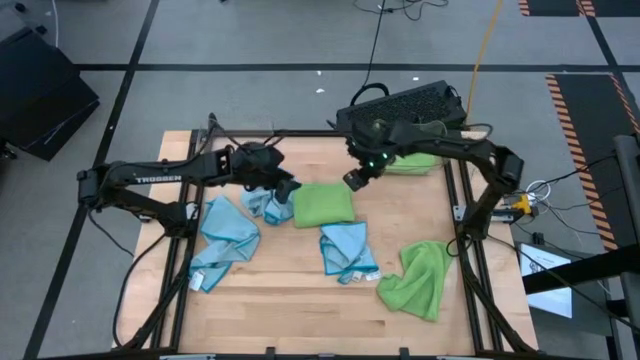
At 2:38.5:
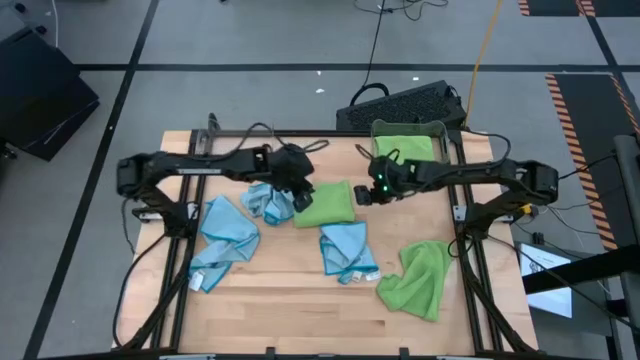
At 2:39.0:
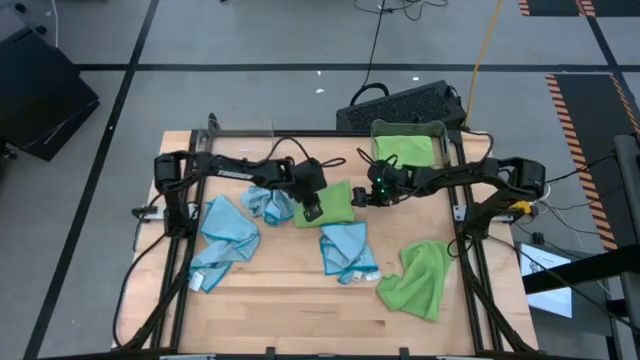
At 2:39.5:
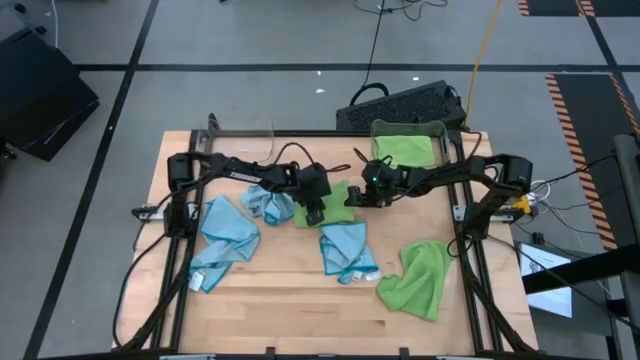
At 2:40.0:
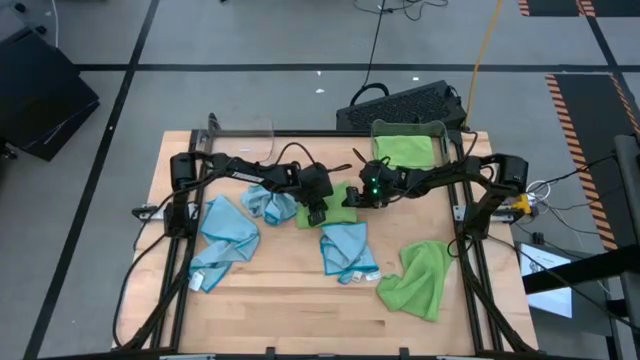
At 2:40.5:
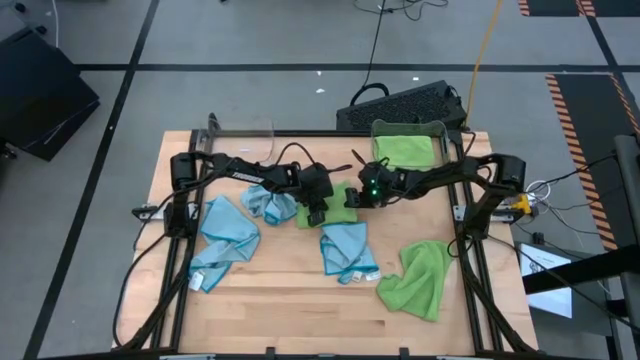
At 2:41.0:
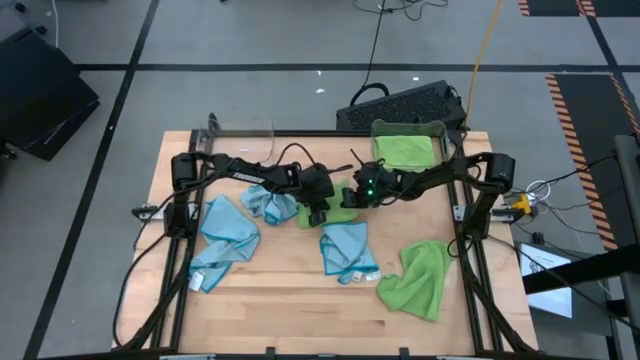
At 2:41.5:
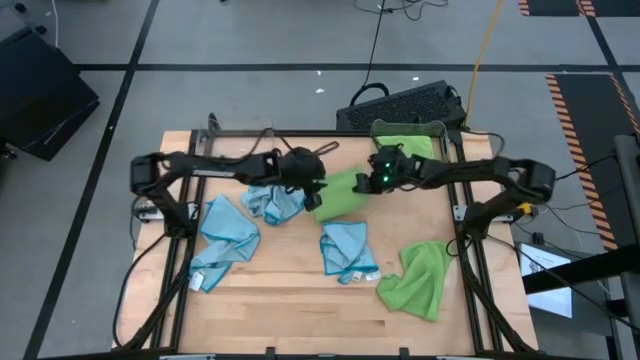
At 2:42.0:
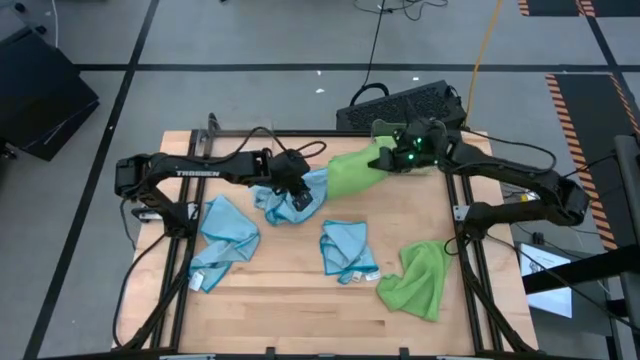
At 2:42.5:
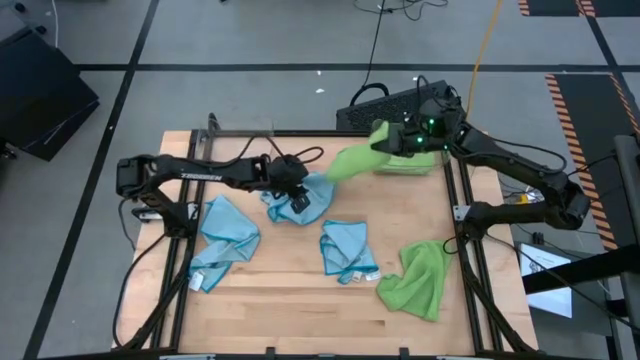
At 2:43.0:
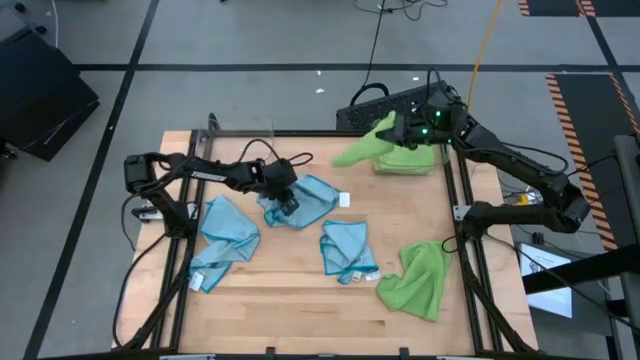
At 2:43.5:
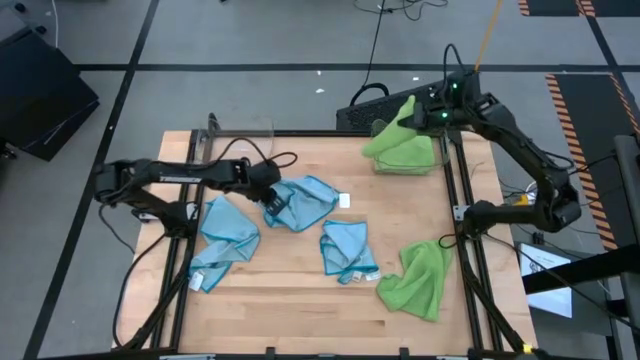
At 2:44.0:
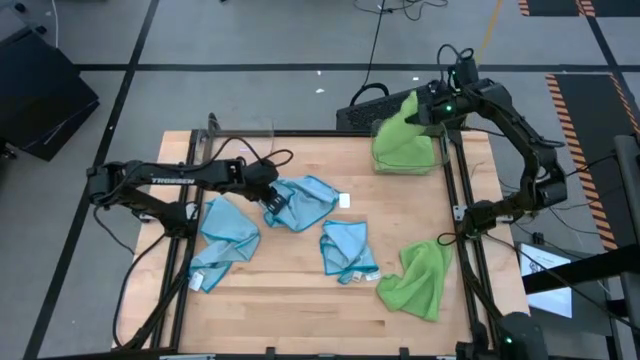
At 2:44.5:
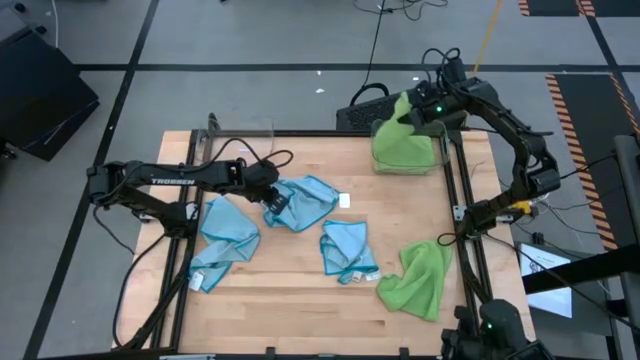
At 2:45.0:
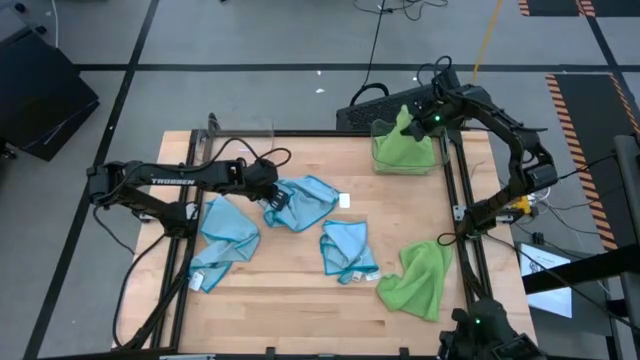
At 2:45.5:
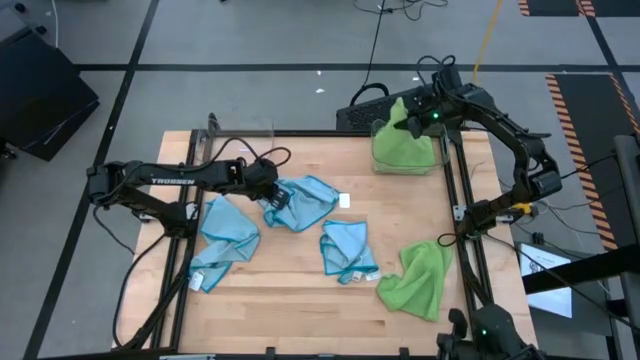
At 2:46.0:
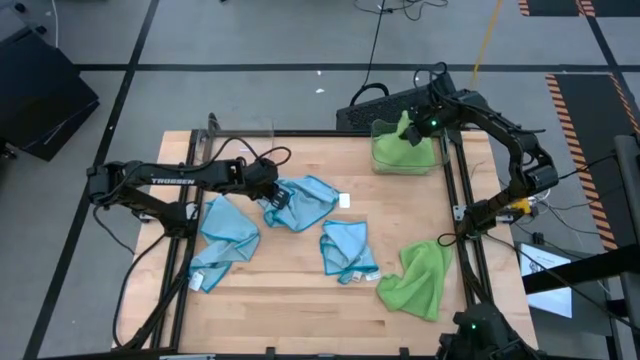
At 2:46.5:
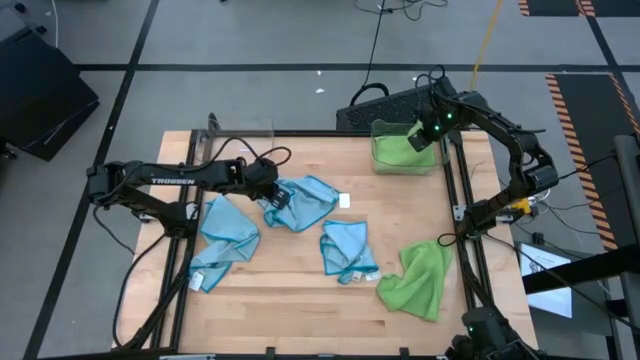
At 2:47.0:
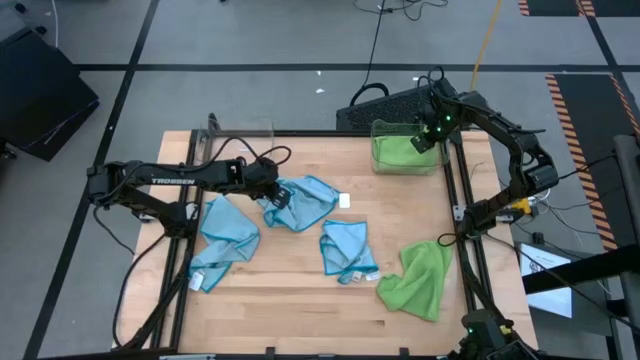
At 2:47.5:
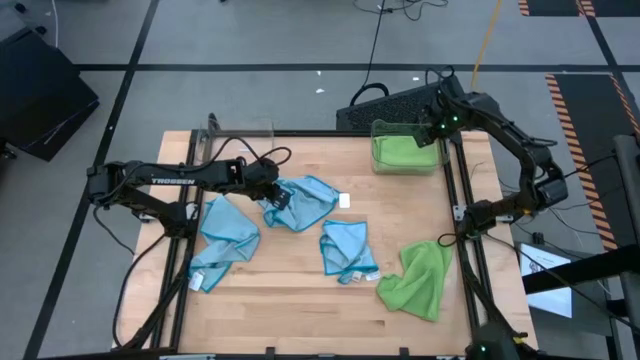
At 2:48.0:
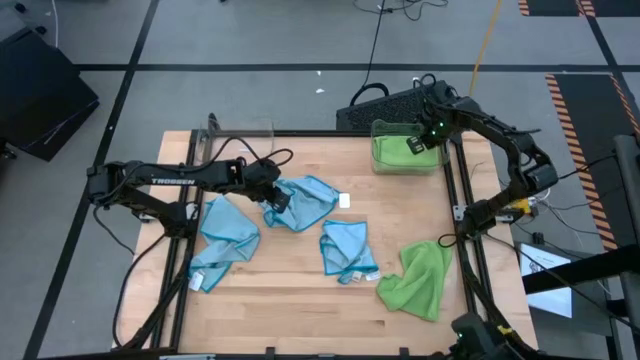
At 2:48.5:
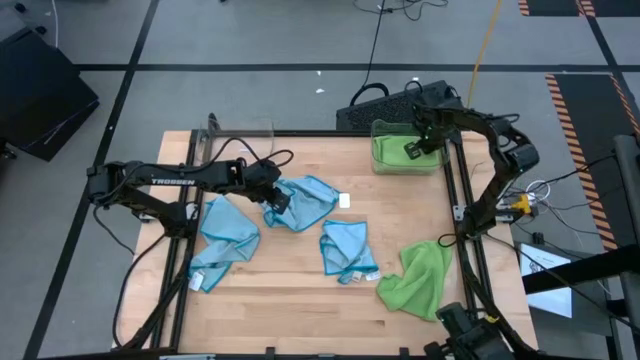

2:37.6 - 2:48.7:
Task: Sort microfiber towel by color & place in baskets
Stack the left green towel on top of the green towel in the right transparent bin

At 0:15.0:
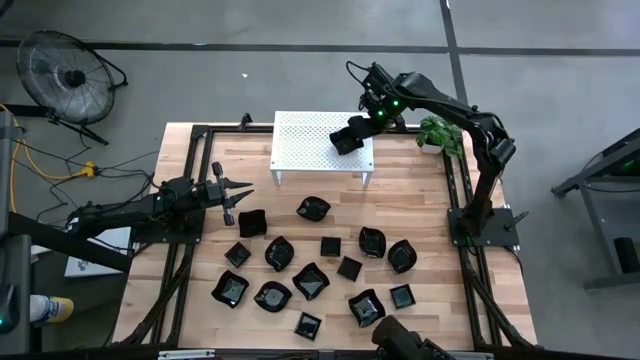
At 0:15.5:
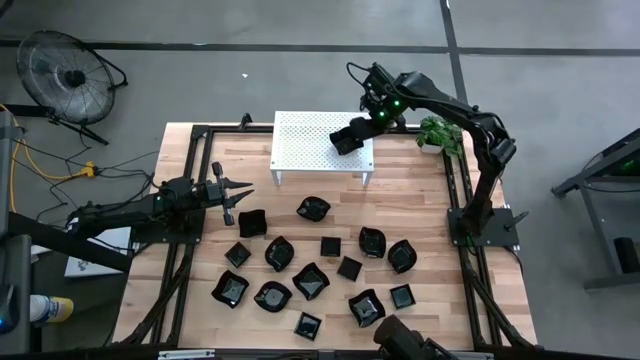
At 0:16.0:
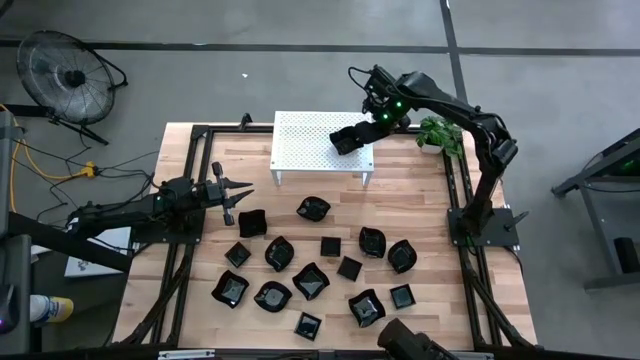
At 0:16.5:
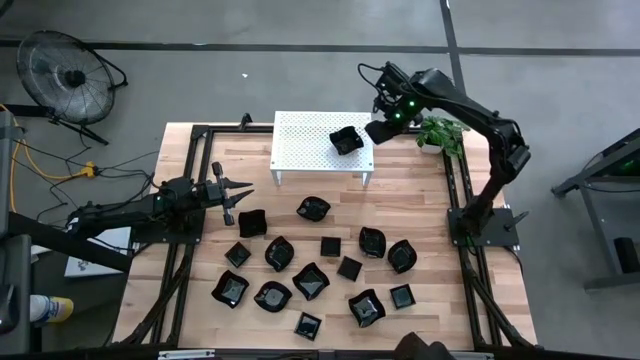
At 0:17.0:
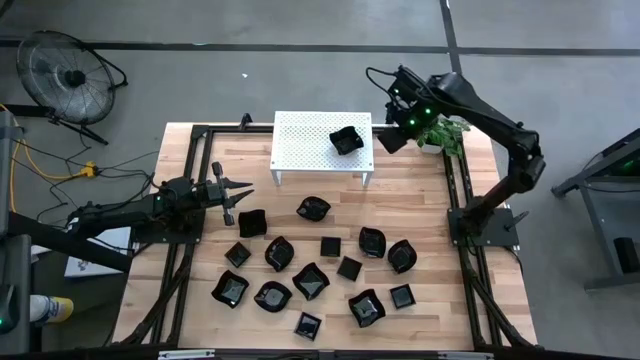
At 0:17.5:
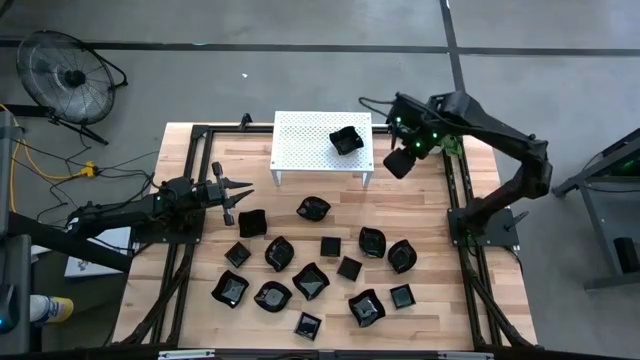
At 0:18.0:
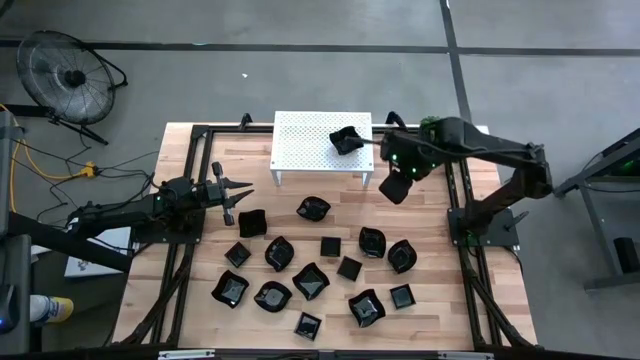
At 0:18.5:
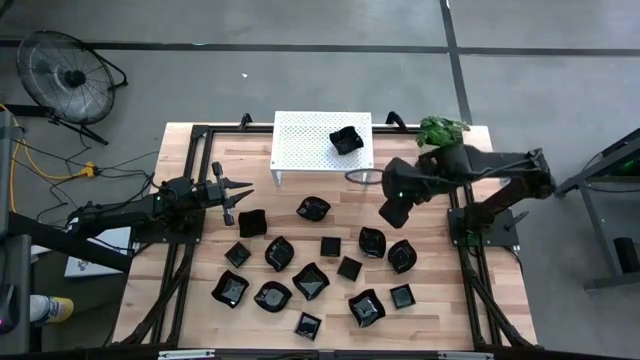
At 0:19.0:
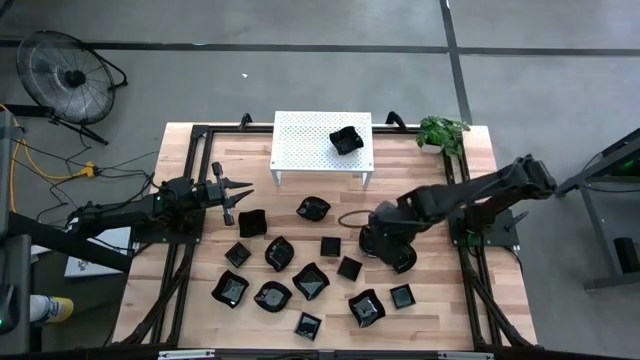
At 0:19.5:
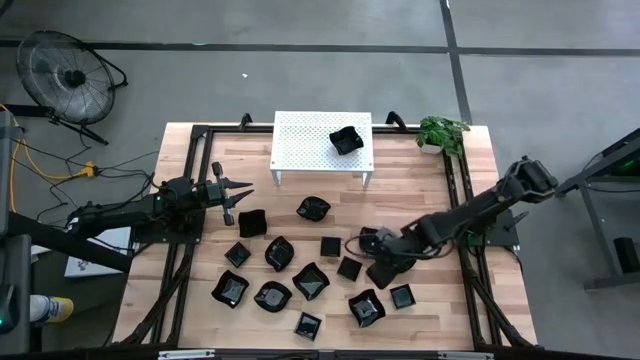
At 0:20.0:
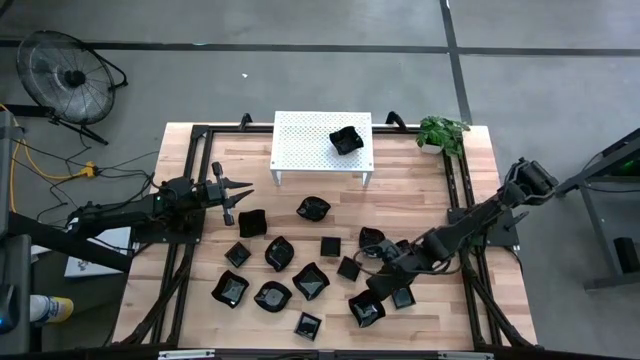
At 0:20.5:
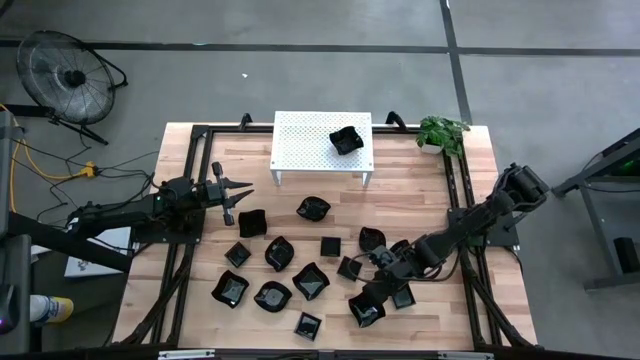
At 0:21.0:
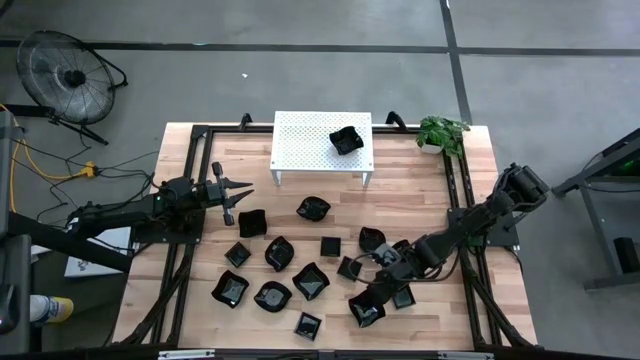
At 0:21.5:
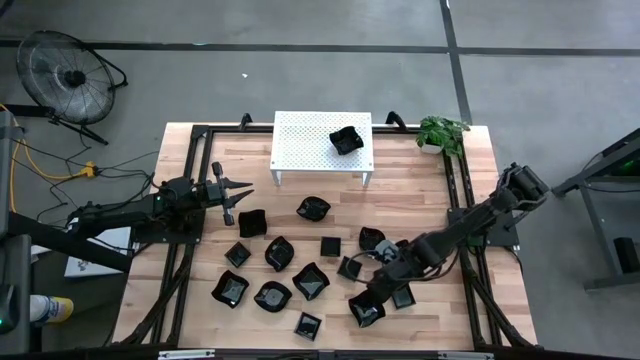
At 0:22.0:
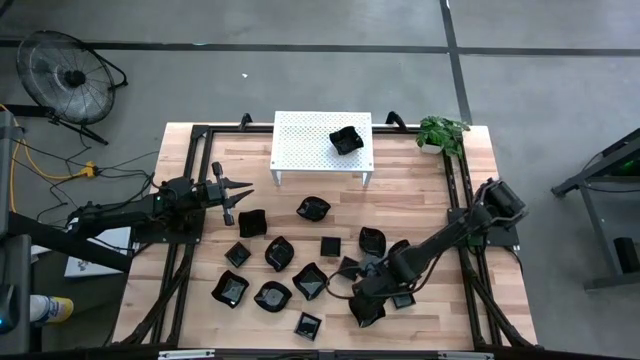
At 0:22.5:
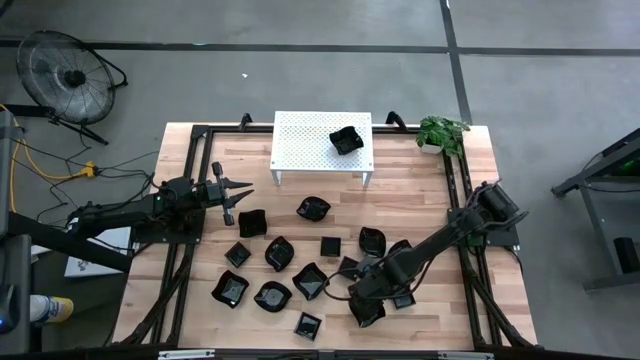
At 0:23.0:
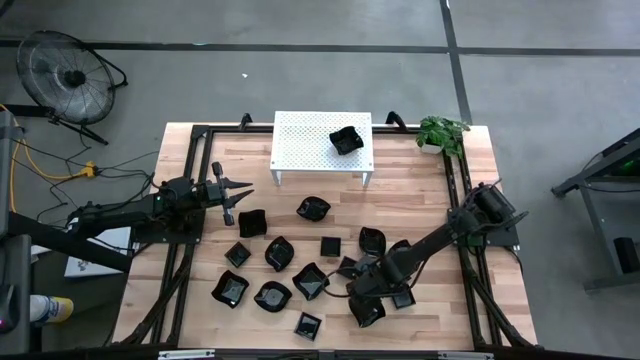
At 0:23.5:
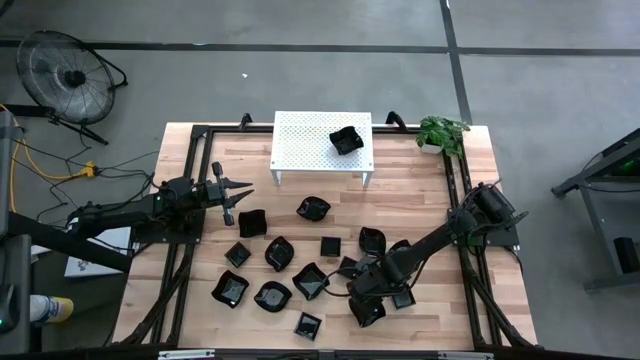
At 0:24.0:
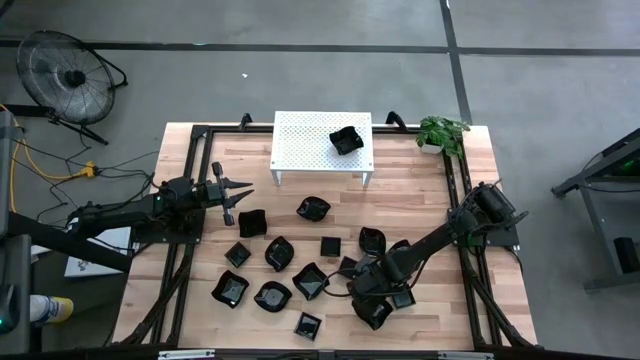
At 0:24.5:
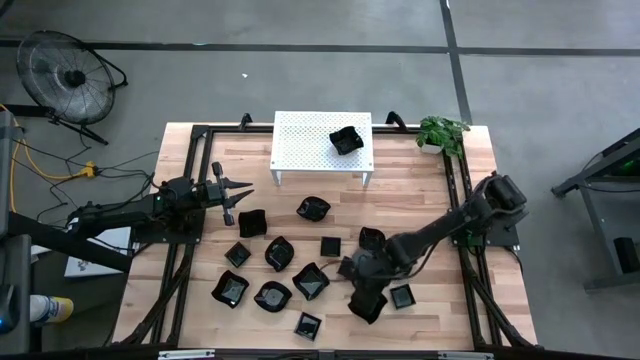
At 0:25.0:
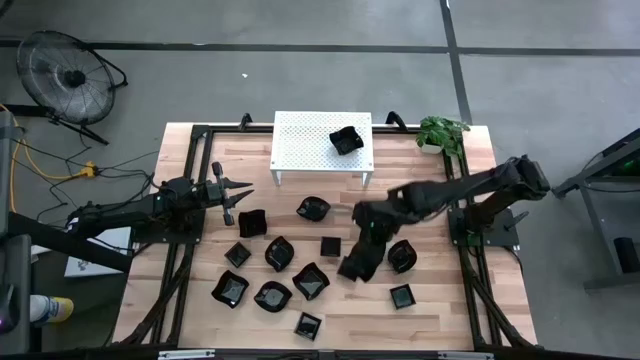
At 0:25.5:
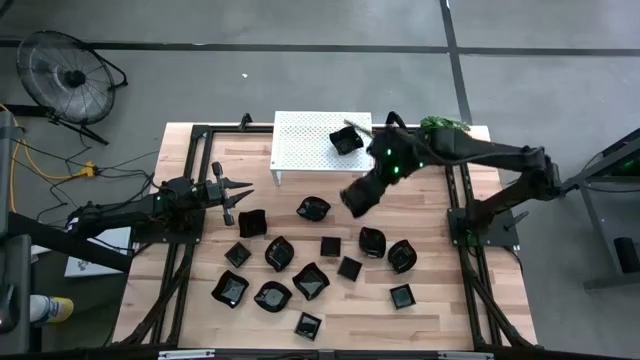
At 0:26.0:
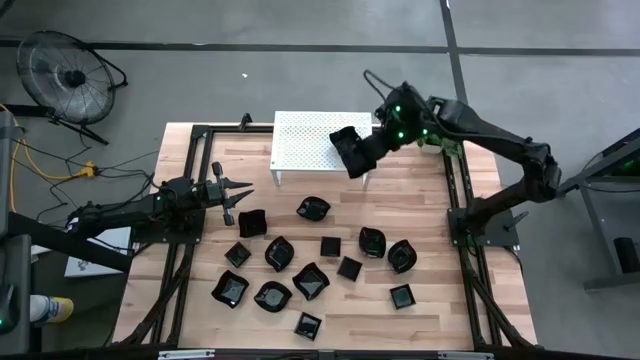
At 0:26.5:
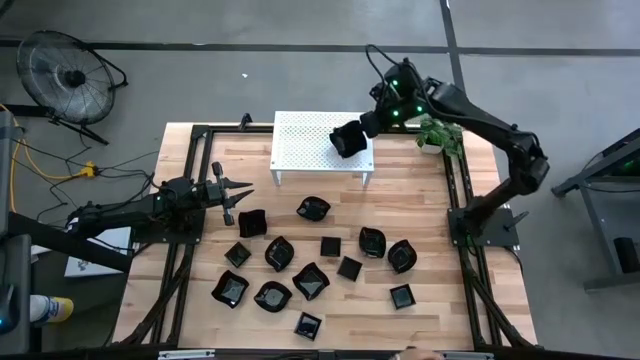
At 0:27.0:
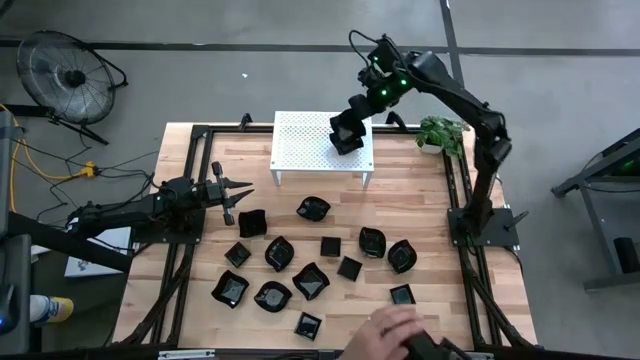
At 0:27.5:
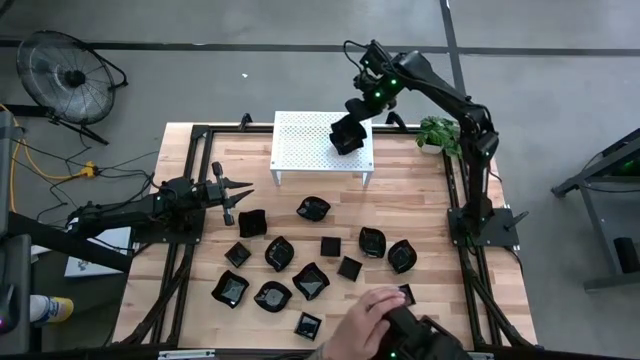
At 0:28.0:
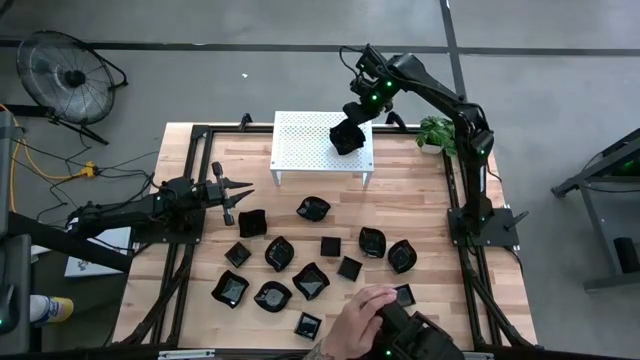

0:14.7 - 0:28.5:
Task: Pick & Place Mini shaped plates
Stack the black distorted square plate on top of the black distorted square plate on the shelf
